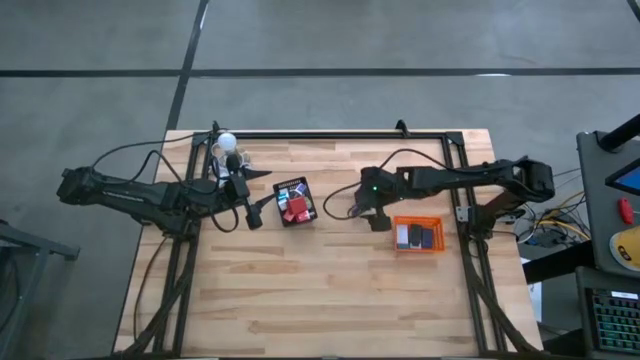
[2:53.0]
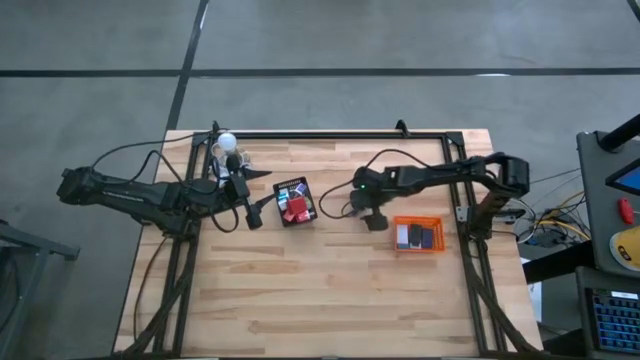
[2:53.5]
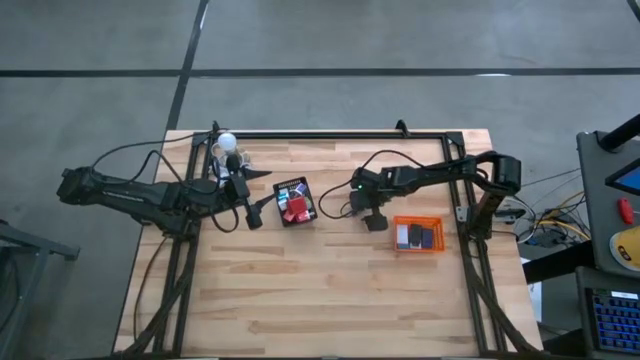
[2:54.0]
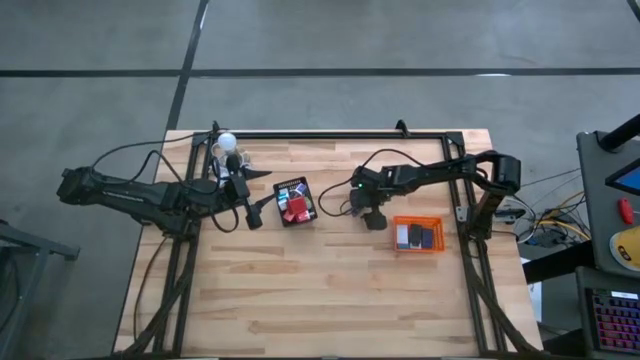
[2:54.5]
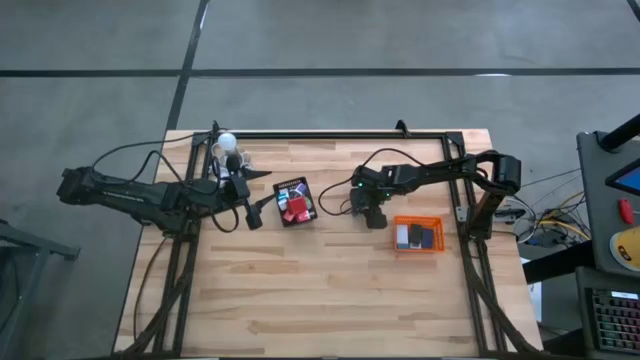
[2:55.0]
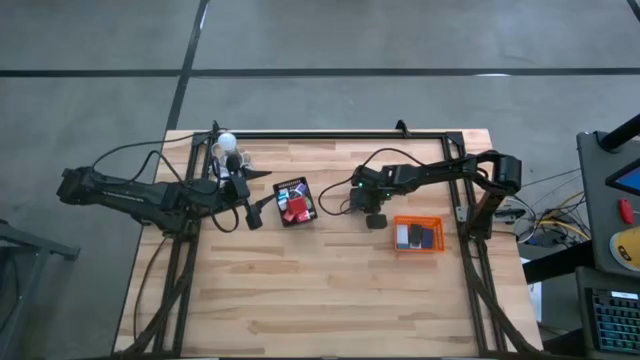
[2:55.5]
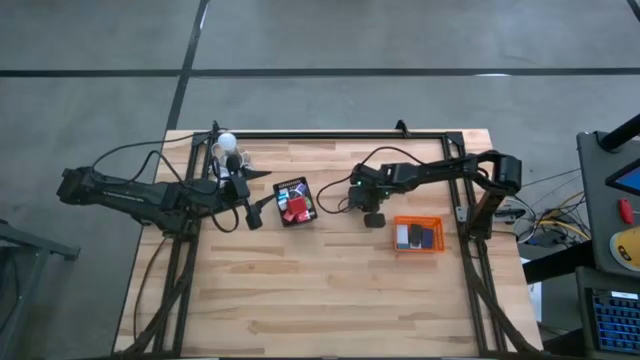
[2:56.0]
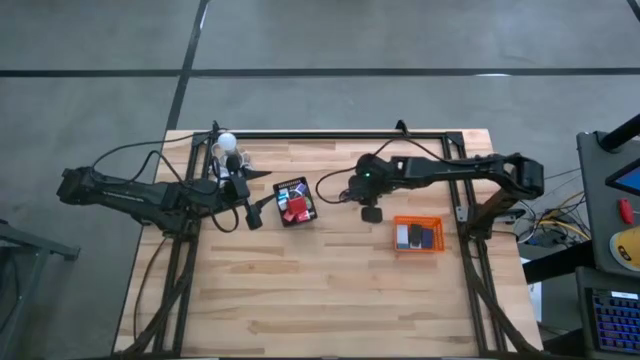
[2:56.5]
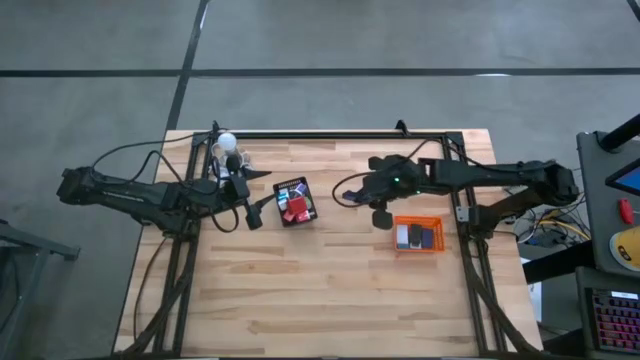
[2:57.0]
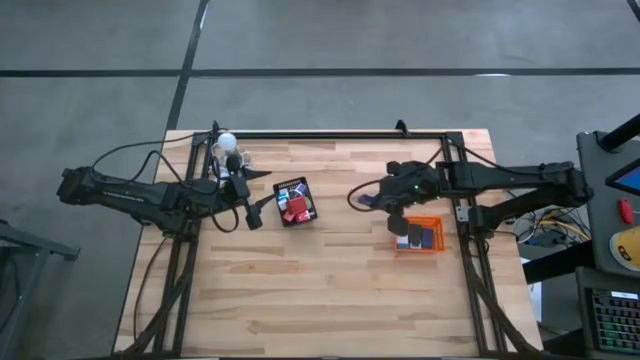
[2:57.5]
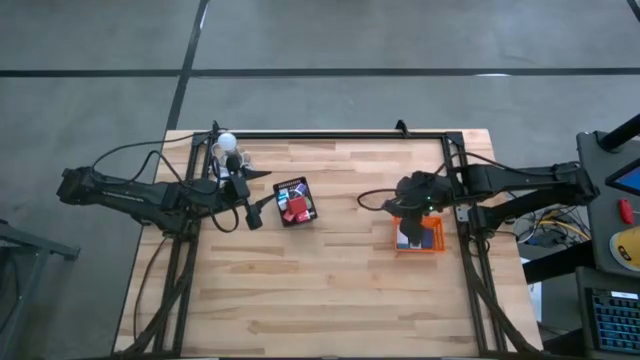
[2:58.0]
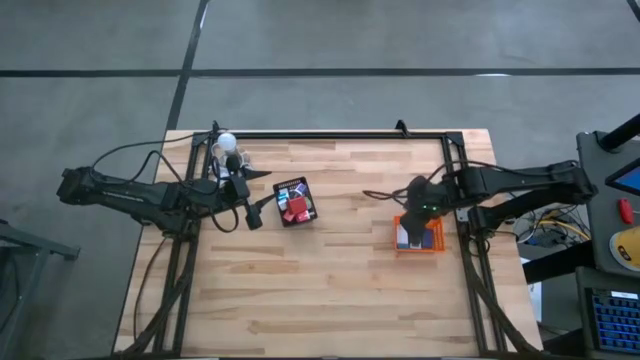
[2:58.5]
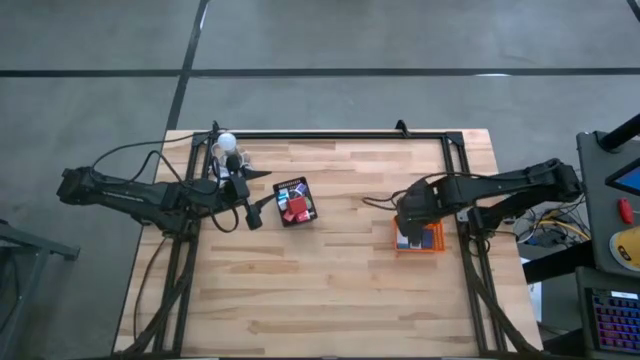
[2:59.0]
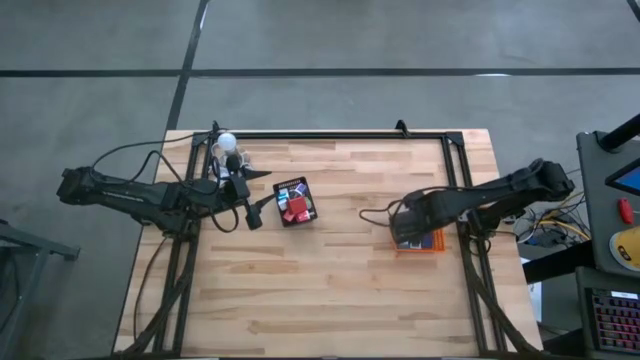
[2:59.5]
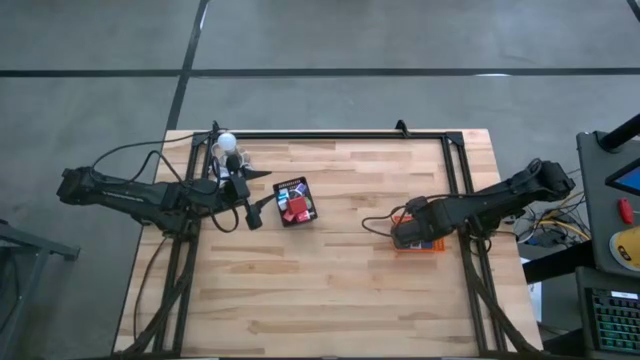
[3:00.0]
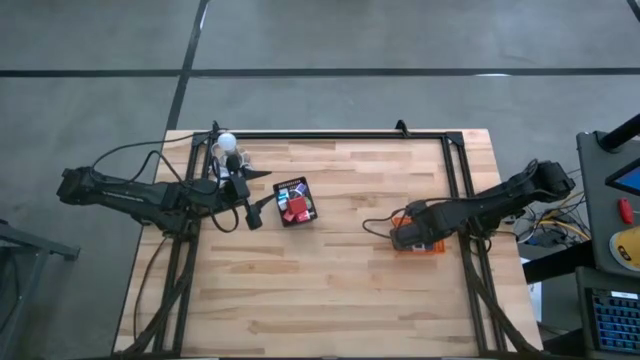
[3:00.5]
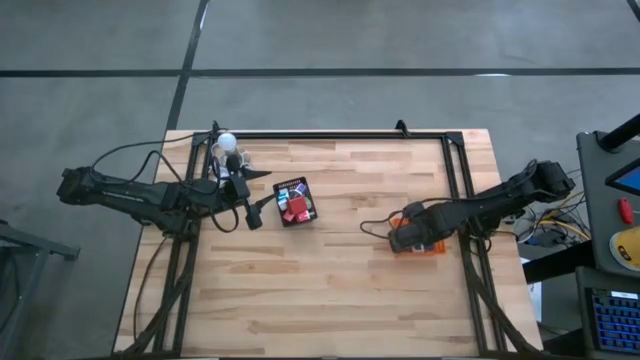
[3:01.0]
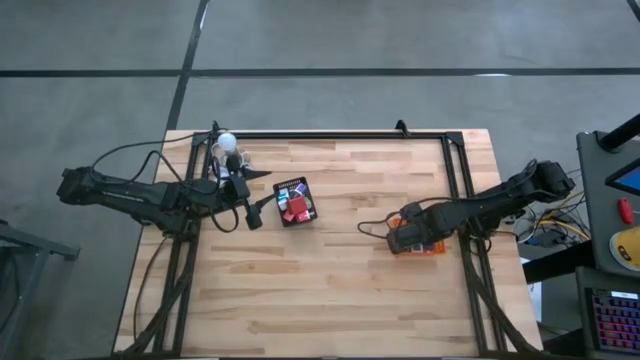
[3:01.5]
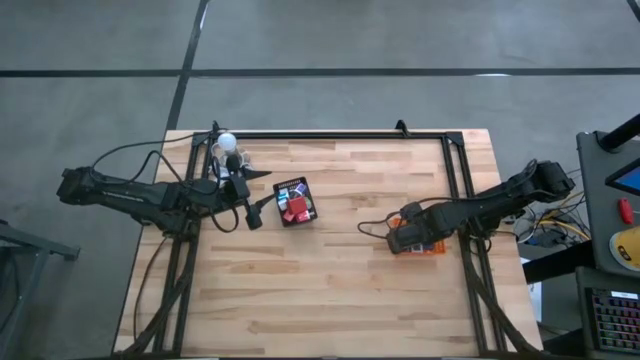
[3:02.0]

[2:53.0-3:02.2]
Task: Pick & Place Office items
Put the dark blue digital clock in the orange bin

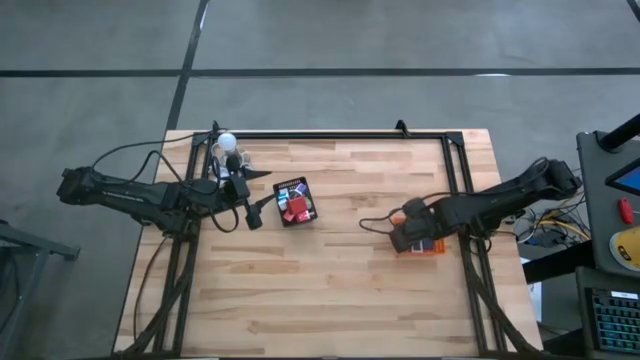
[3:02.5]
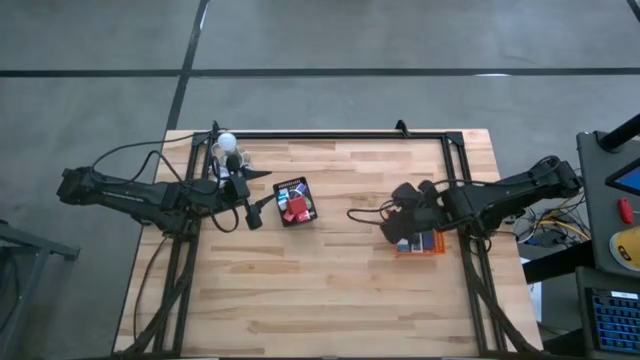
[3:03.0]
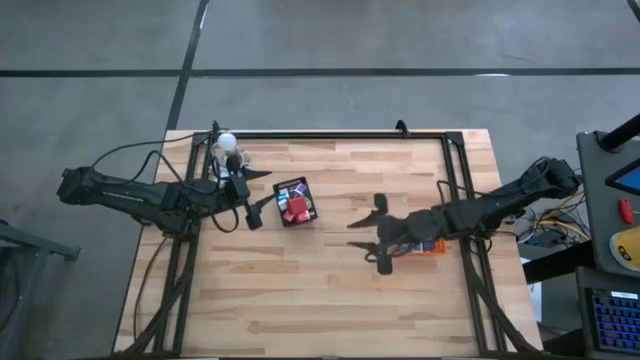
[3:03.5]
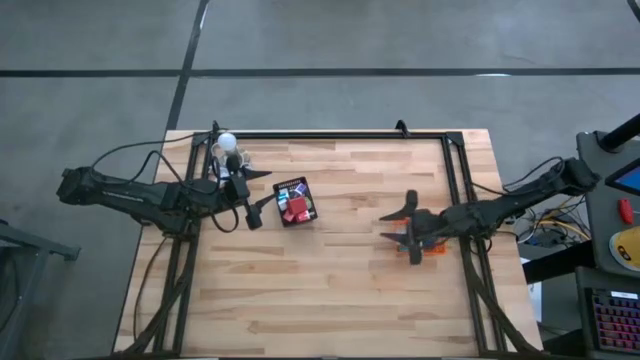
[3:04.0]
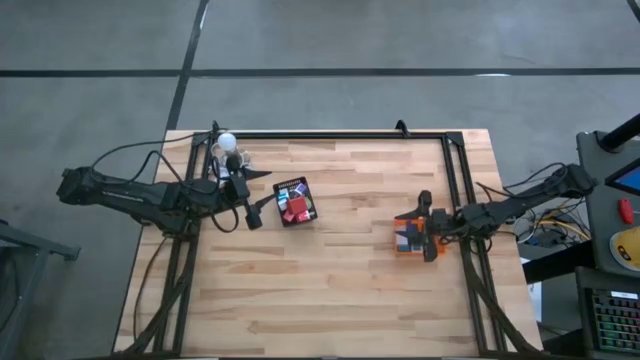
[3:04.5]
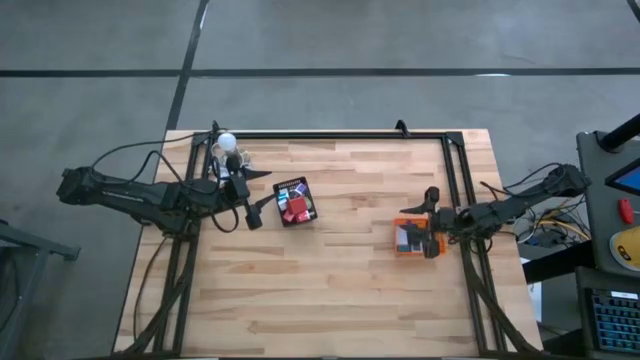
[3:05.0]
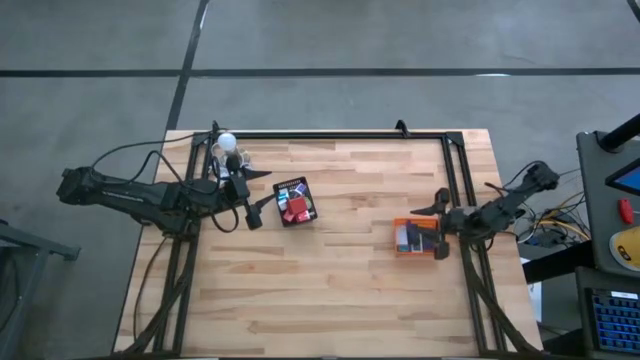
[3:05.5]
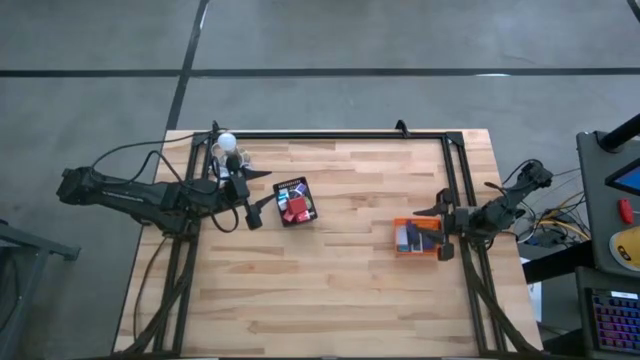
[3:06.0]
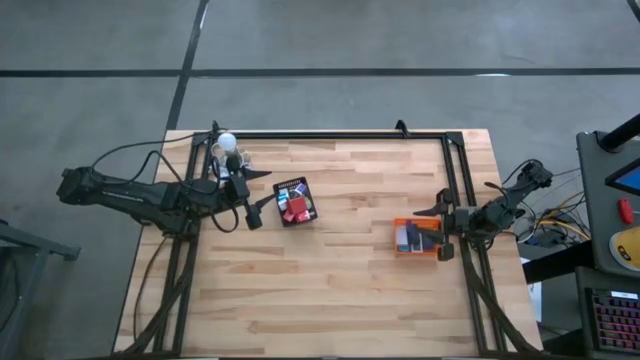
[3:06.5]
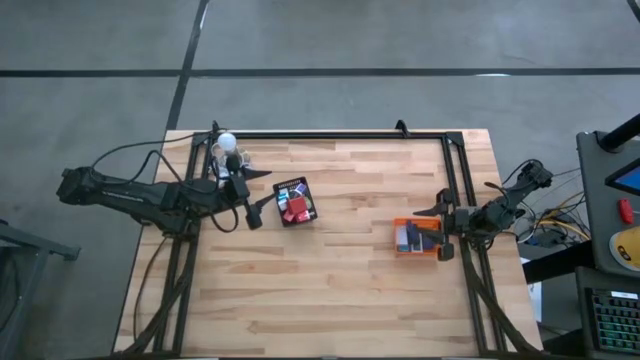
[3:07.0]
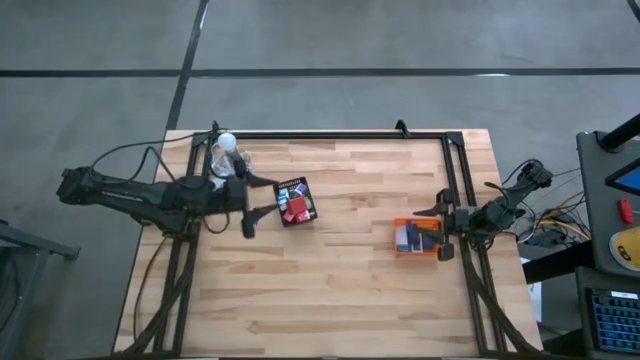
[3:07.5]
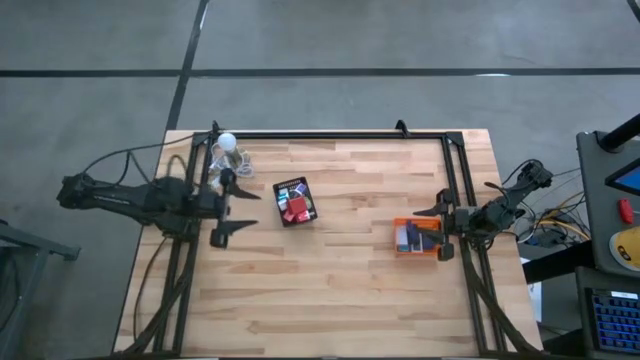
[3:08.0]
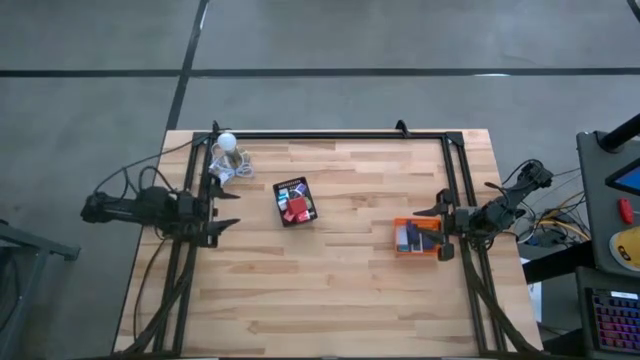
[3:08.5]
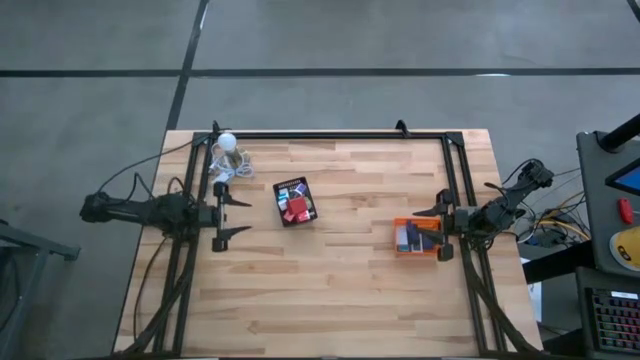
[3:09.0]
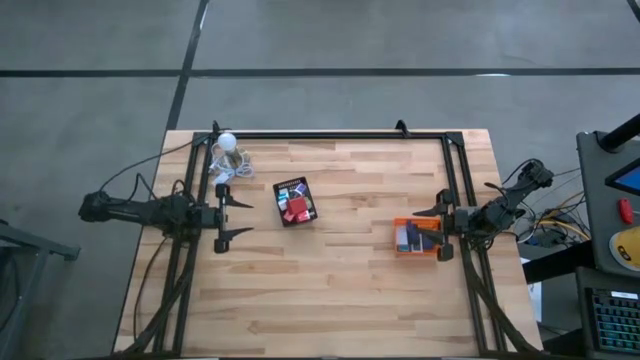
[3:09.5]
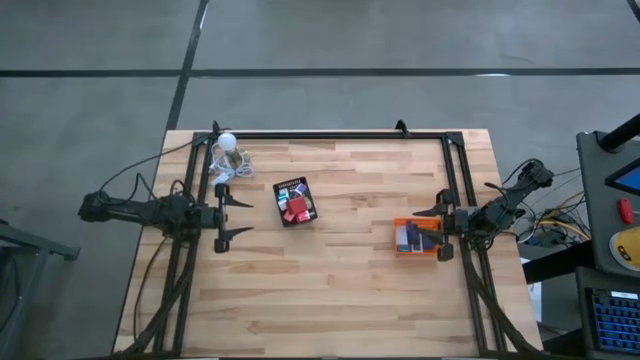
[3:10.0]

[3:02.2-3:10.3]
Return to Home Position

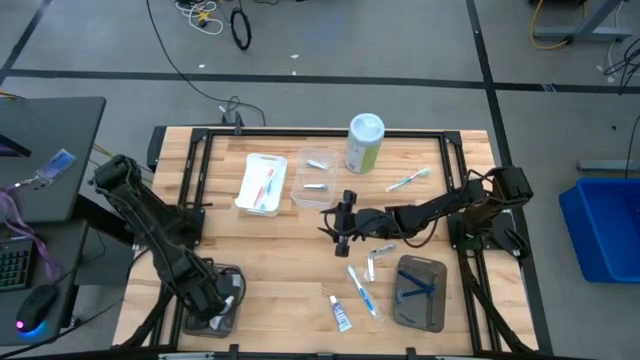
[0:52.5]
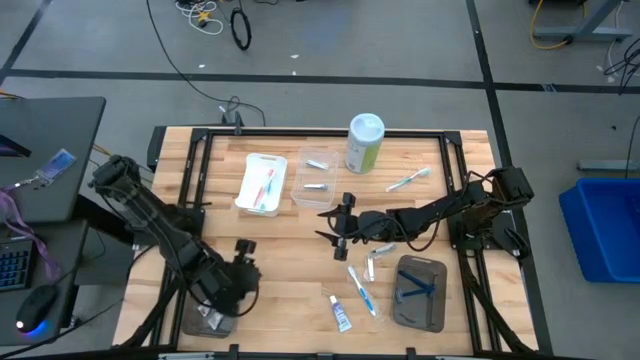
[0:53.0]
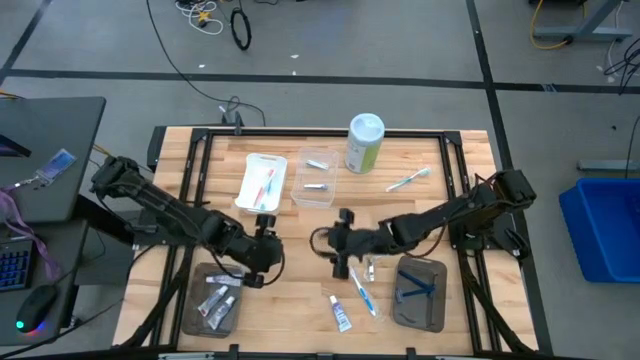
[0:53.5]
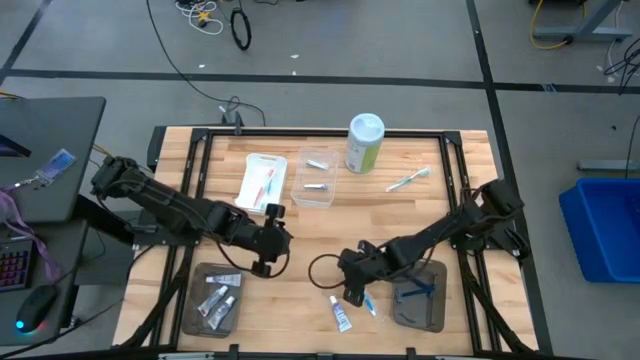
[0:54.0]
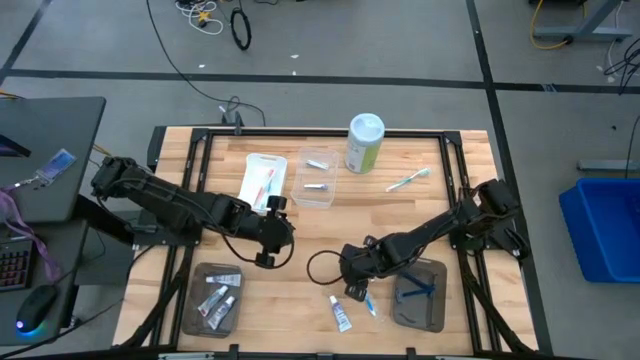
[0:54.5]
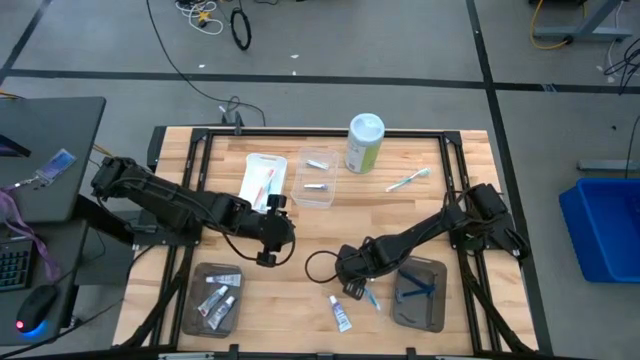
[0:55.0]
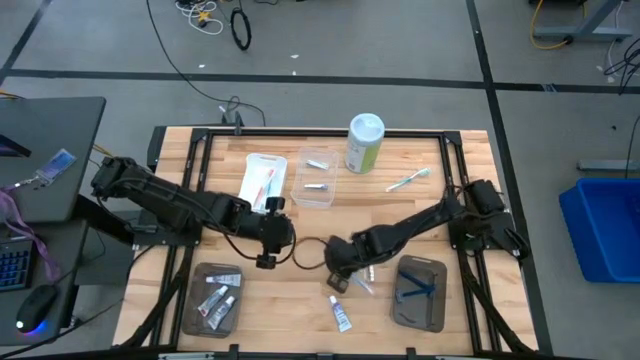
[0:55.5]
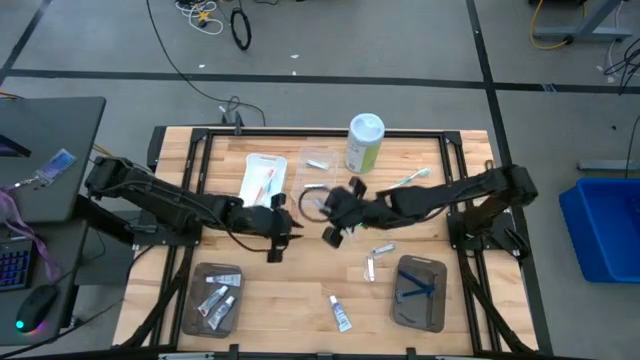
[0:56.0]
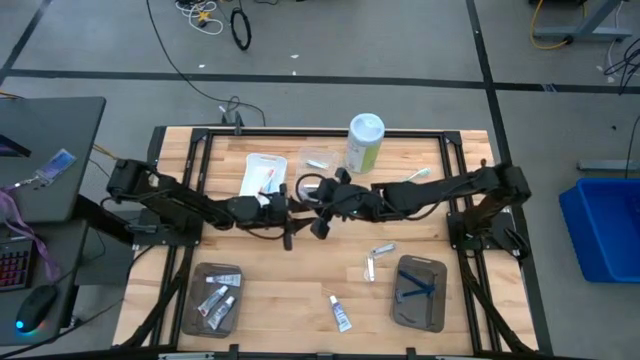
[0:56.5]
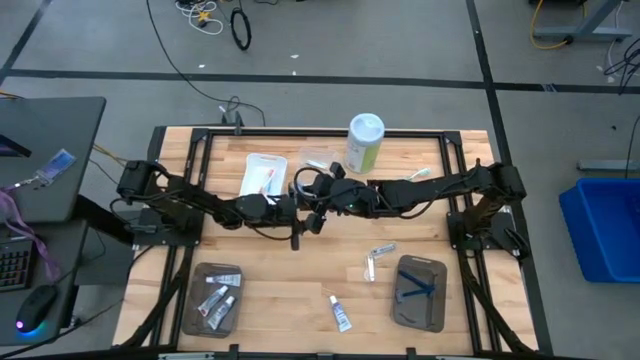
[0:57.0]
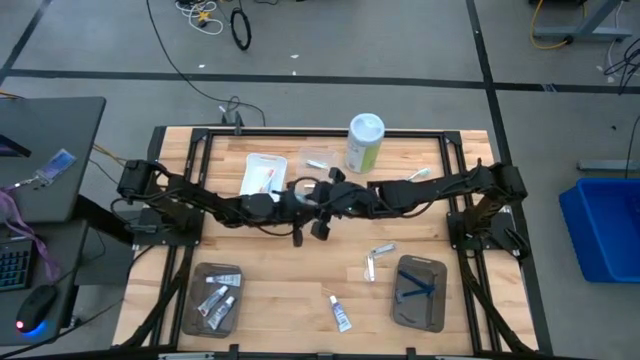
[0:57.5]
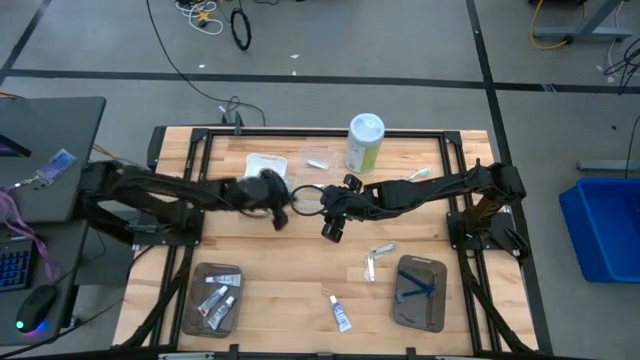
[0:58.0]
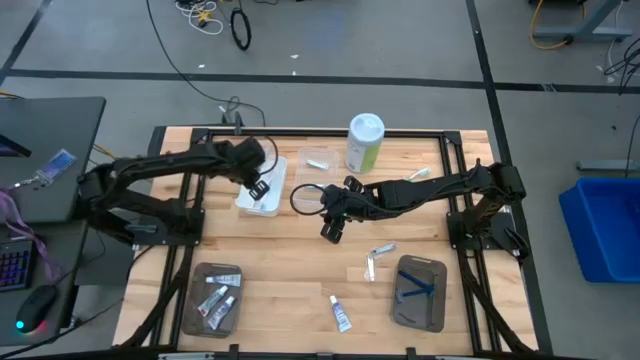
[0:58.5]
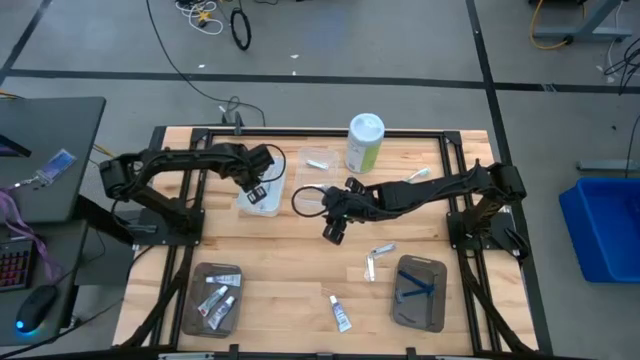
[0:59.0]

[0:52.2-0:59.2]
Task: Pick & Place Travel size toiletries
Put the blue and white toothbrush into the white bin
